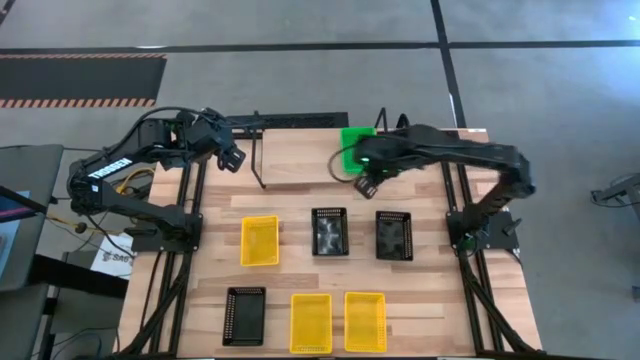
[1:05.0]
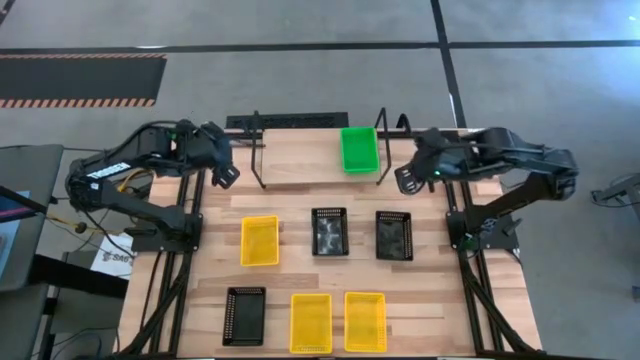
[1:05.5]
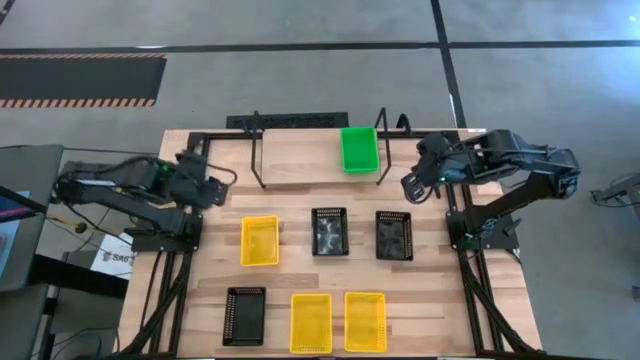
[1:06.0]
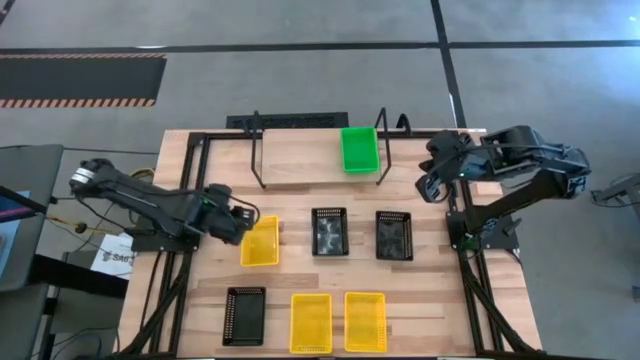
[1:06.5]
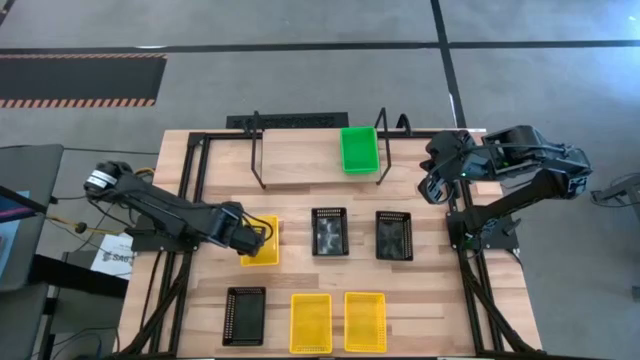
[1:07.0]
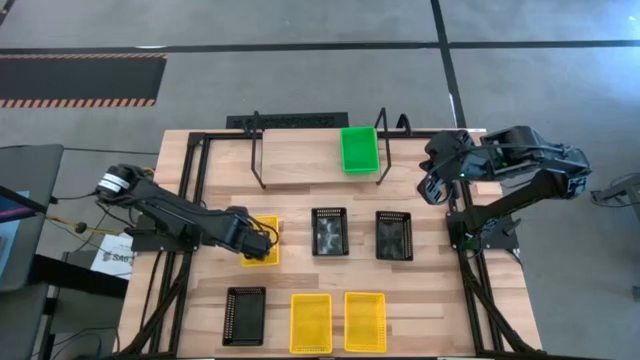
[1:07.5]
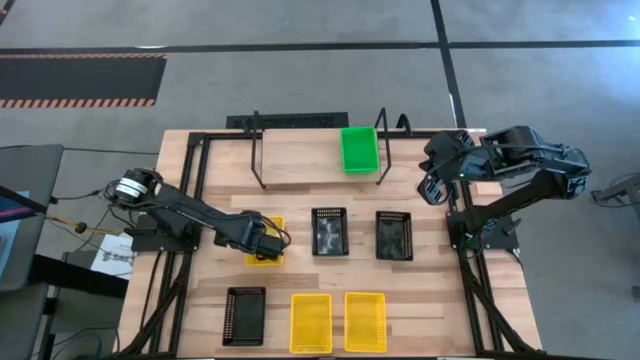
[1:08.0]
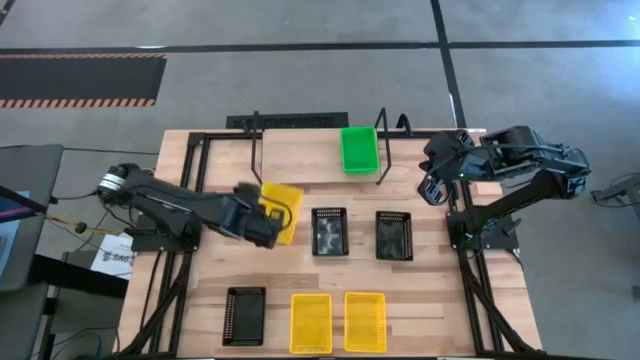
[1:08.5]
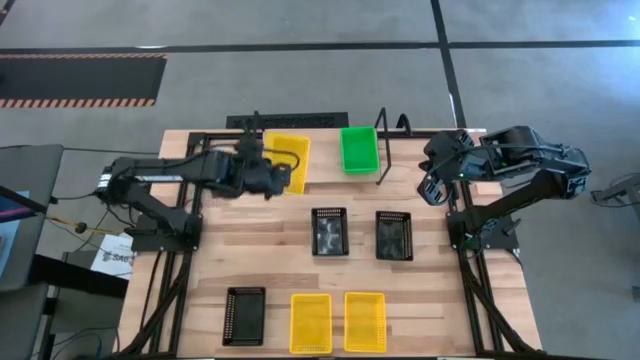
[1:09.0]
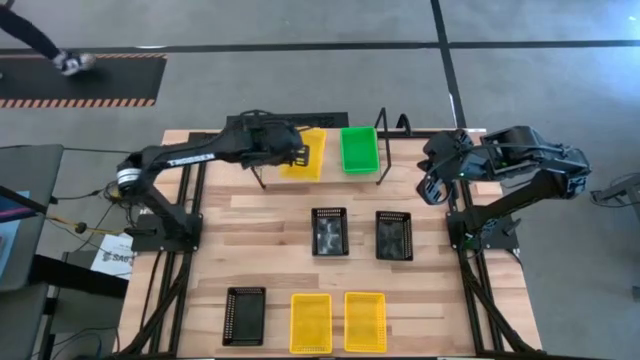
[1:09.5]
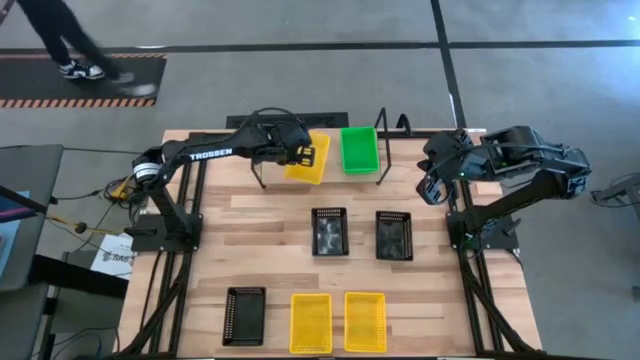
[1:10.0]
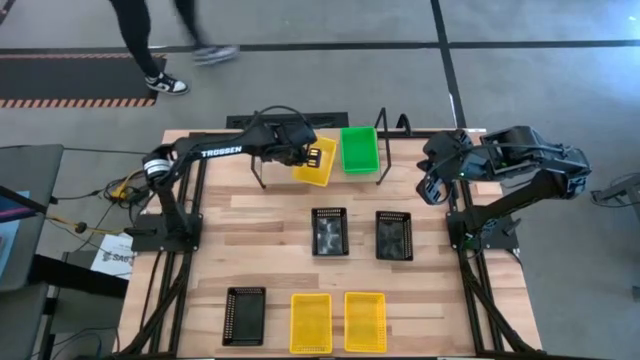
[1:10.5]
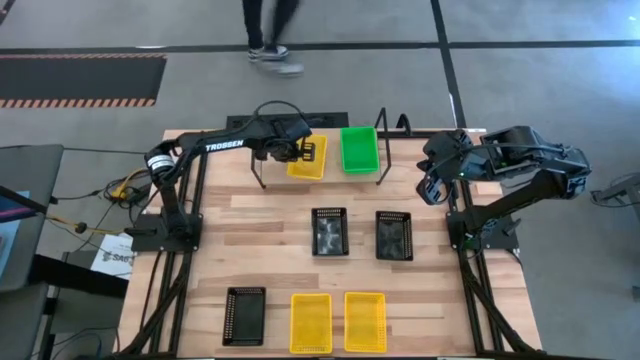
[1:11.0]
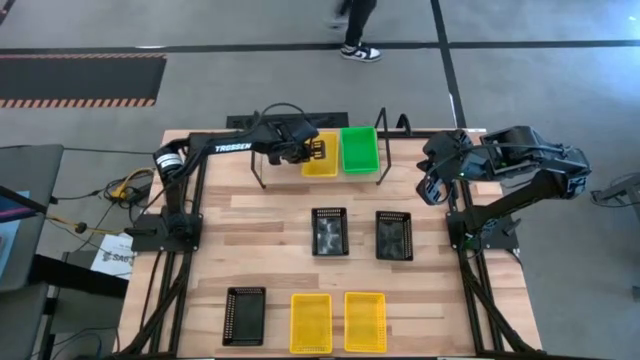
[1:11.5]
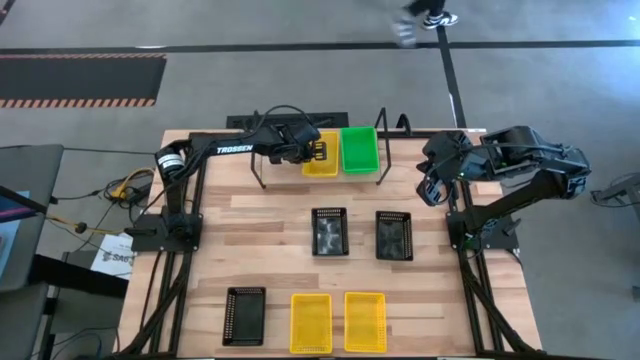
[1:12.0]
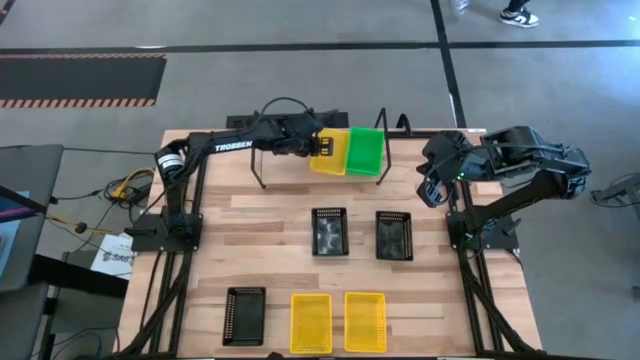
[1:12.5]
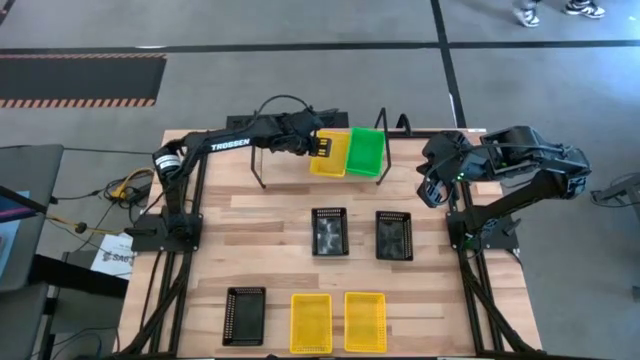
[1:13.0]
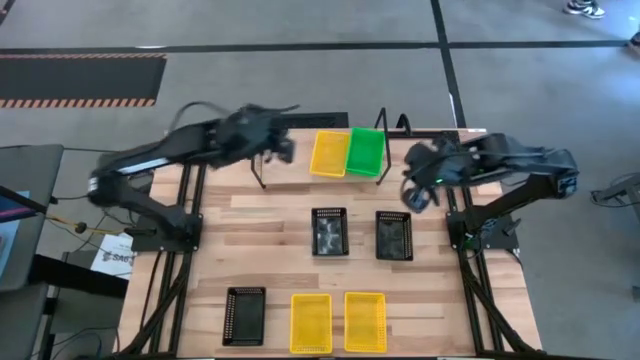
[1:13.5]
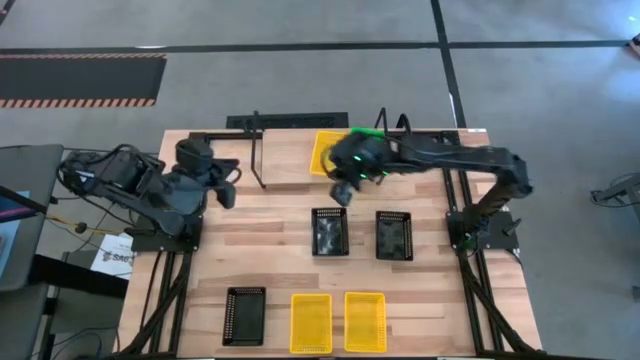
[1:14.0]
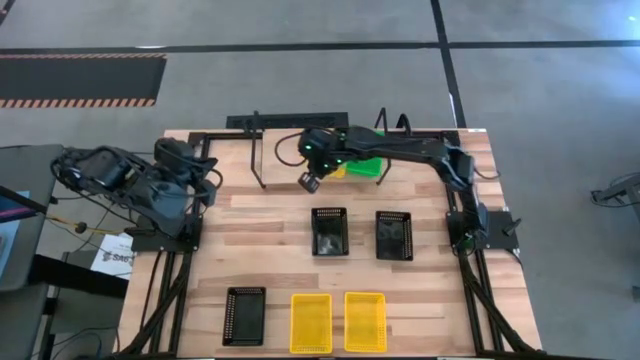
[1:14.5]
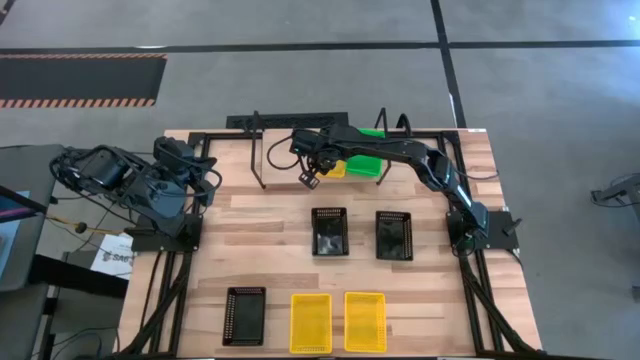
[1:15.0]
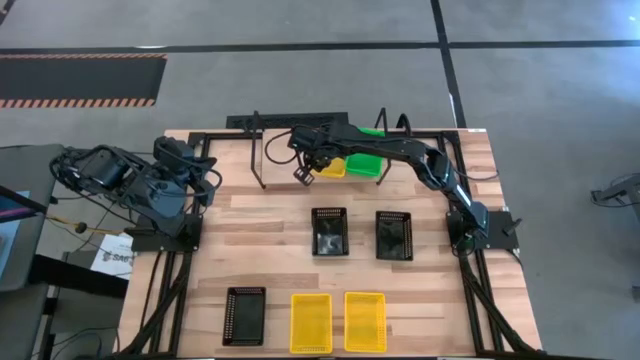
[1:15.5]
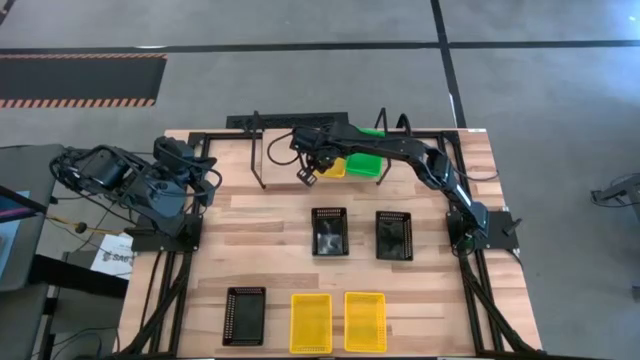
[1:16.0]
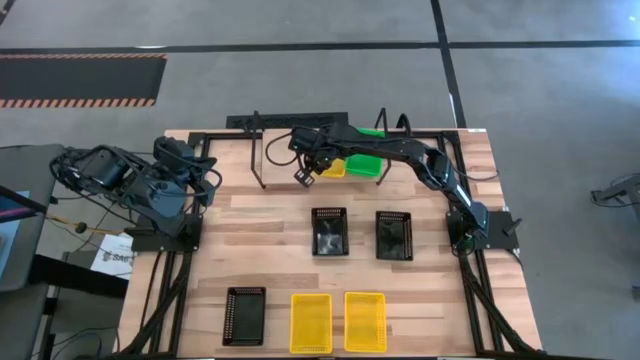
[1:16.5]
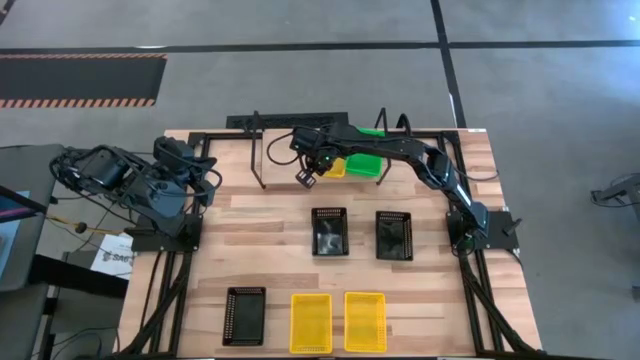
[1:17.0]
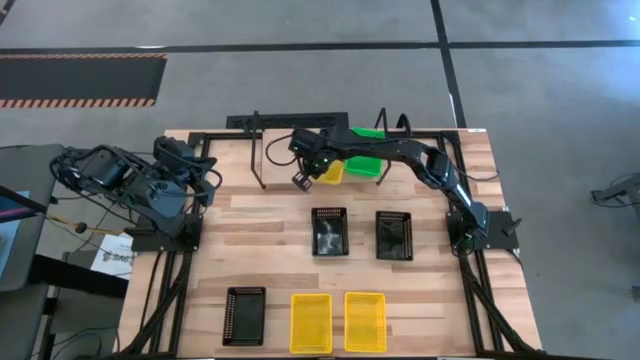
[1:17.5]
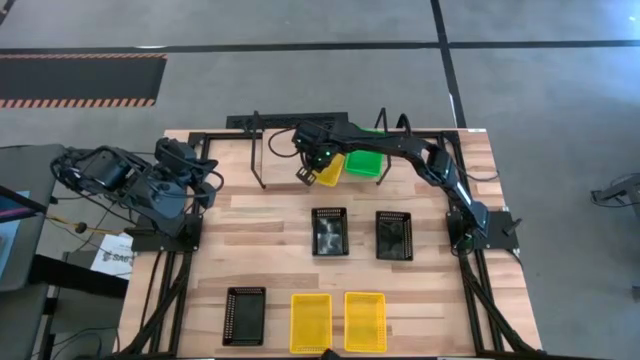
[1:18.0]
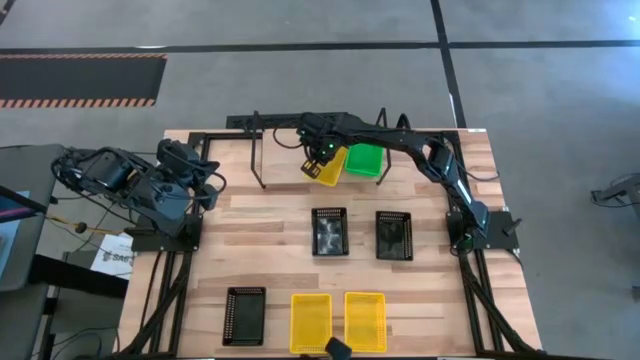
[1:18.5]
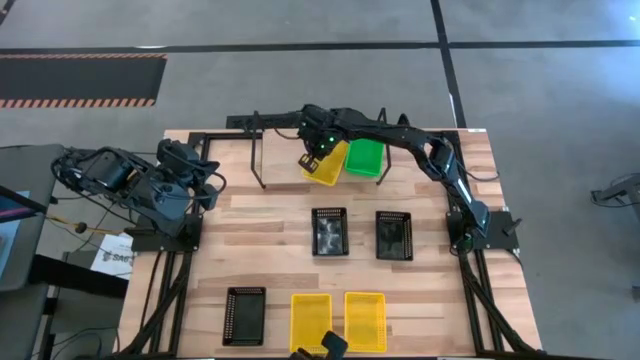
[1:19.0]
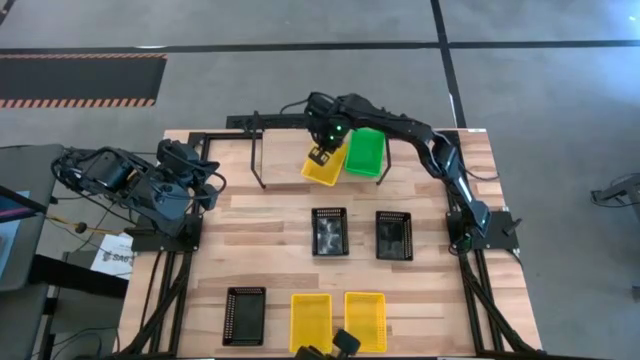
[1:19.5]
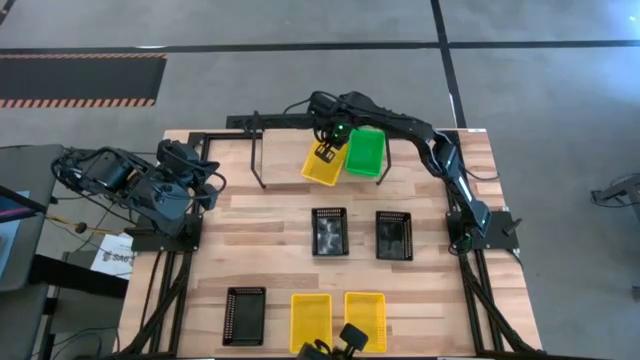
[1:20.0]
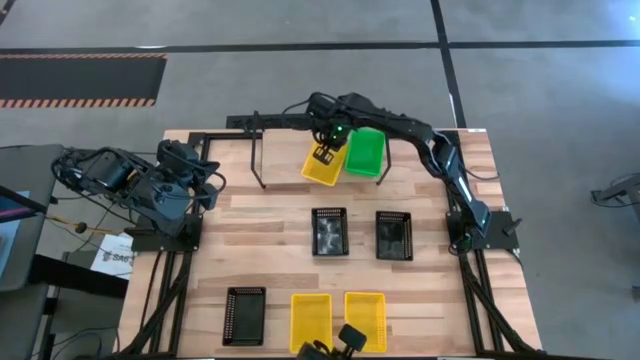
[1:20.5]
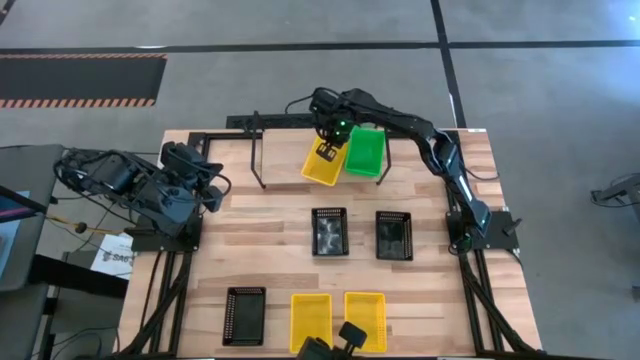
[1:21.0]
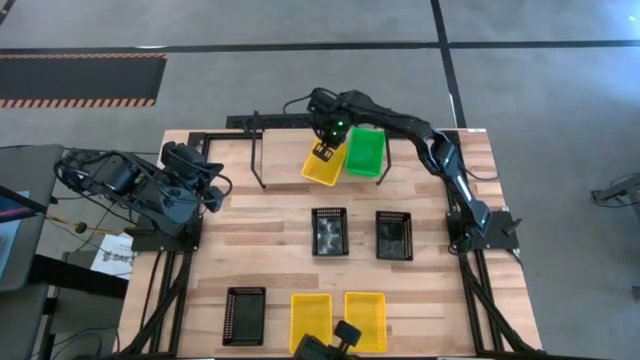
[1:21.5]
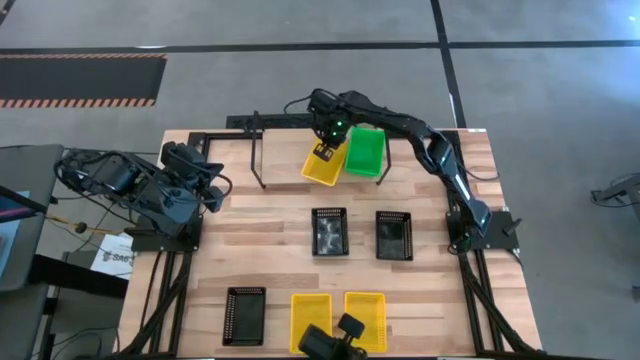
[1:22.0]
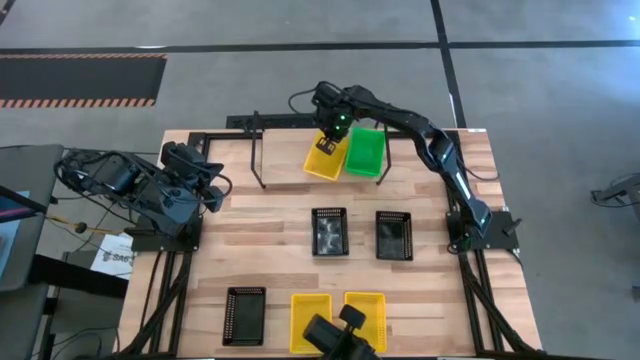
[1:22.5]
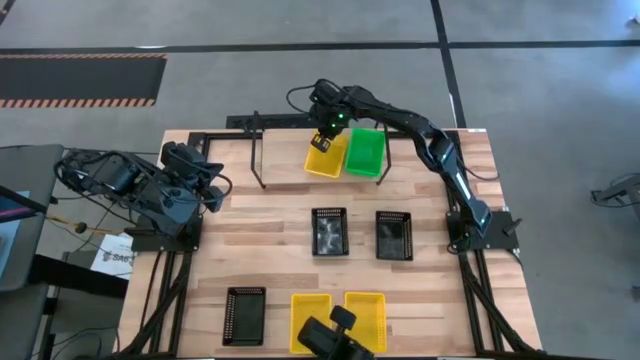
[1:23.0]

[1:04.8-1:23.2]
Task: Stack baskets on shelf by color
Put the top yellow bin on the shelf

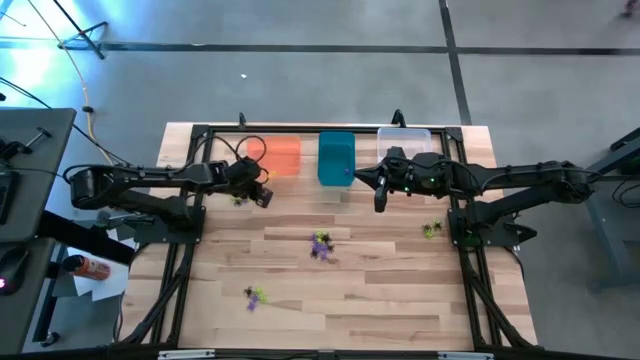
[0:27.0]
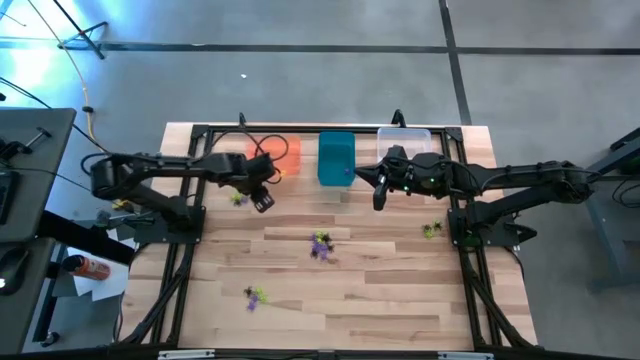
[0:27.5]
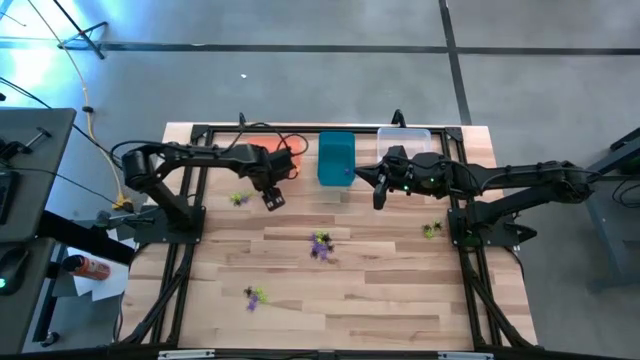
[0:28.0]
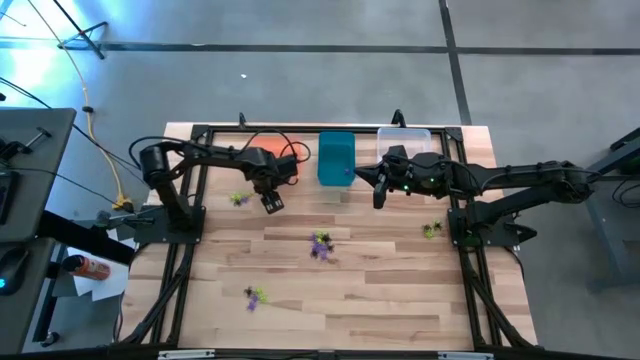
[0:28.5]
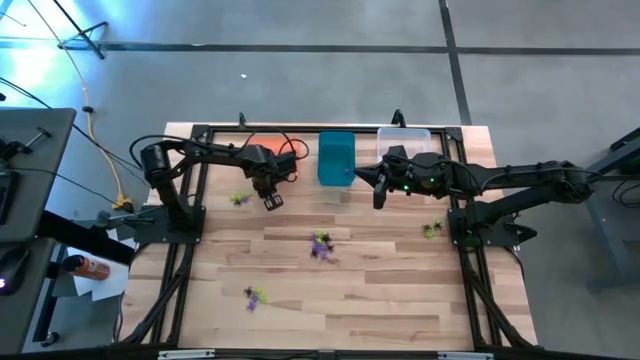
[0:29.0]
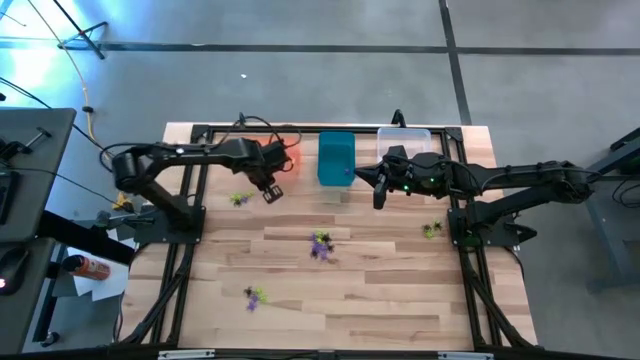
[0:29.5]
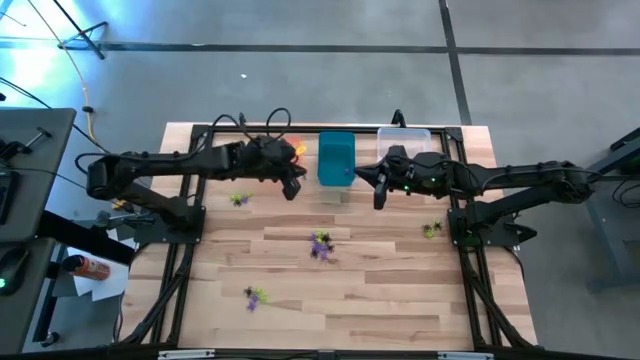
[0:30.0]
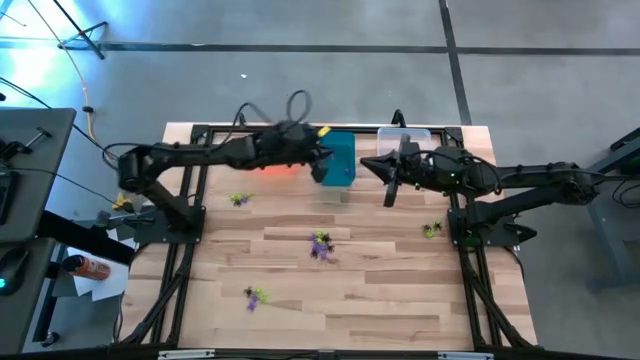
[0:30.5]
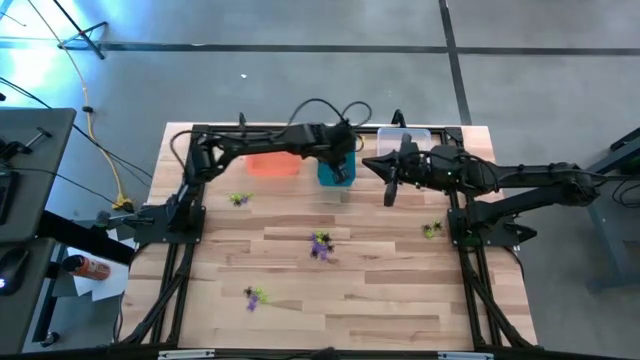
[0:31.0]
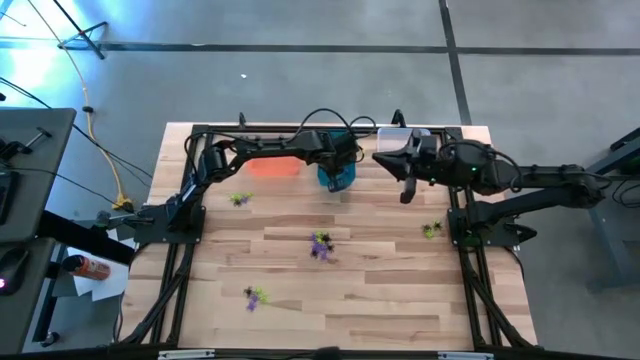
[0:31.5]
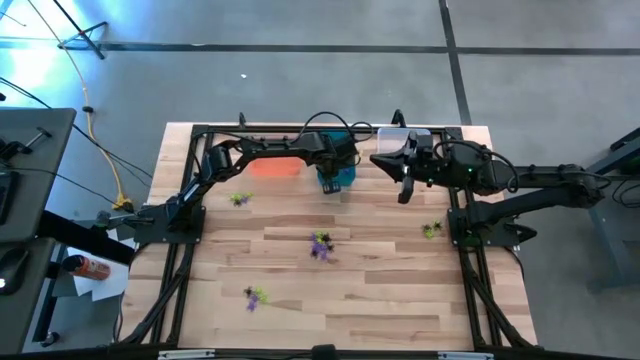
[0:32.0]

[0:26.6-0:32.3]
Task: Sort Halloween decoration
Put the purple spider toy into the blue bin
